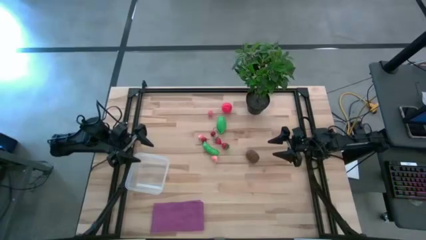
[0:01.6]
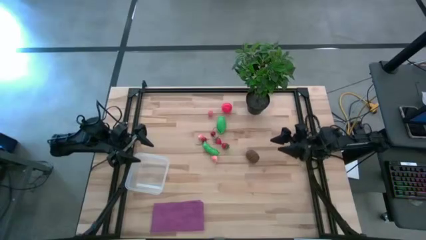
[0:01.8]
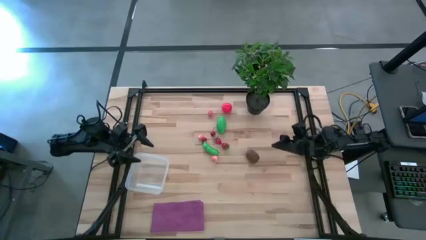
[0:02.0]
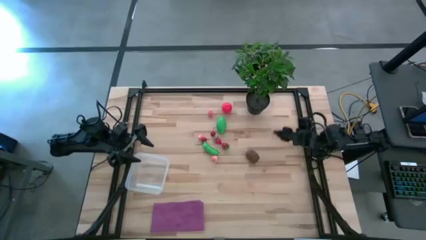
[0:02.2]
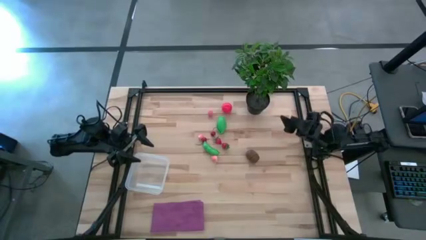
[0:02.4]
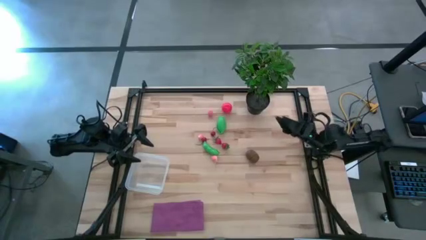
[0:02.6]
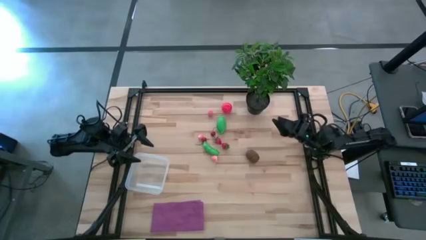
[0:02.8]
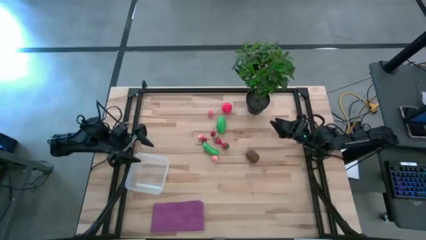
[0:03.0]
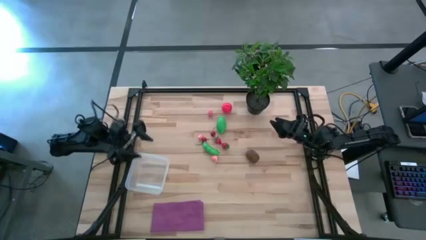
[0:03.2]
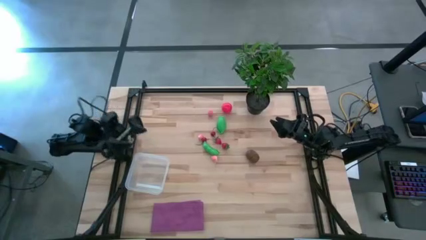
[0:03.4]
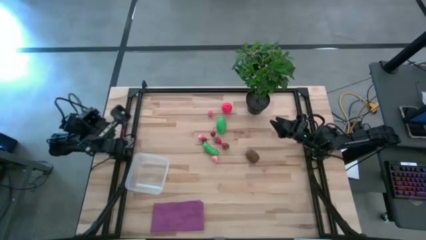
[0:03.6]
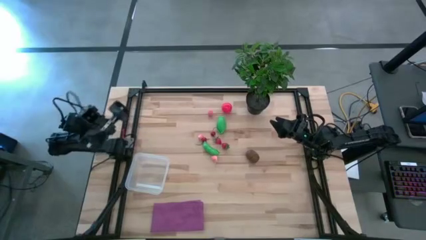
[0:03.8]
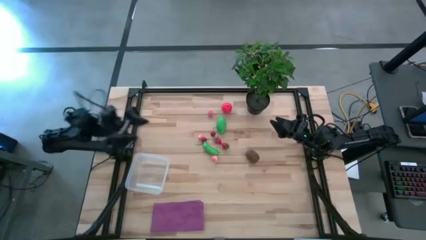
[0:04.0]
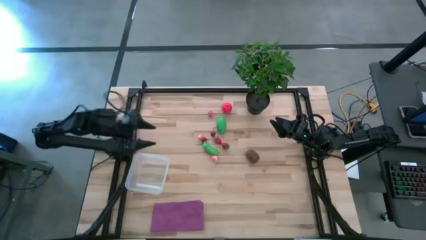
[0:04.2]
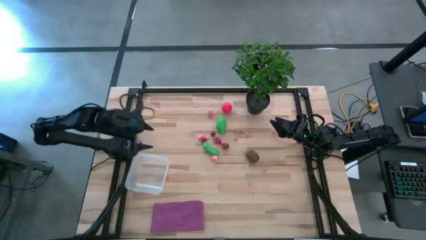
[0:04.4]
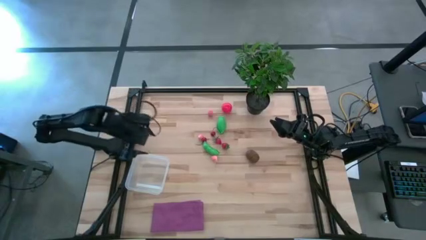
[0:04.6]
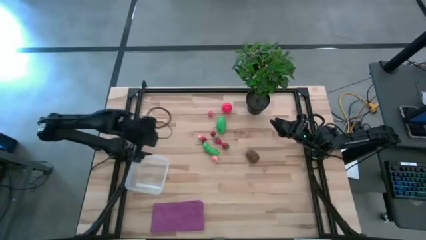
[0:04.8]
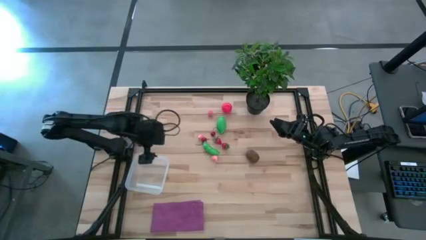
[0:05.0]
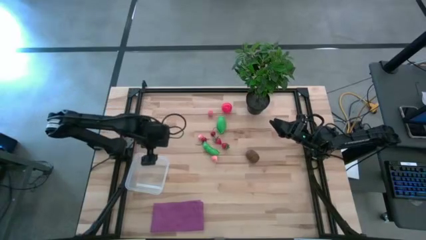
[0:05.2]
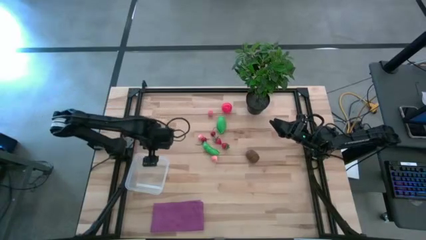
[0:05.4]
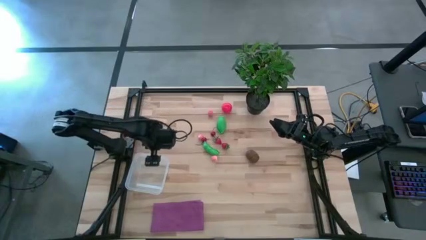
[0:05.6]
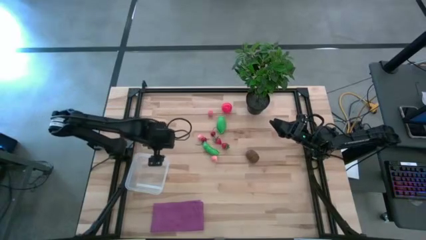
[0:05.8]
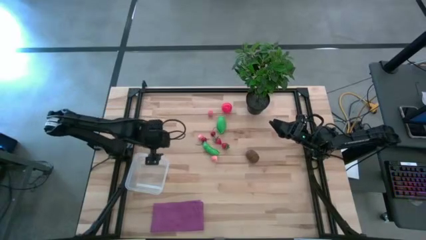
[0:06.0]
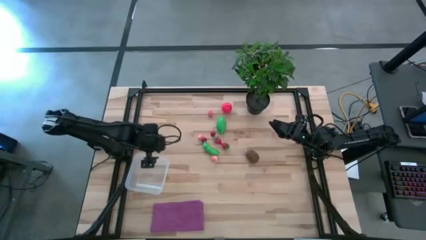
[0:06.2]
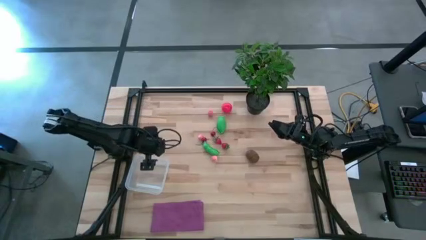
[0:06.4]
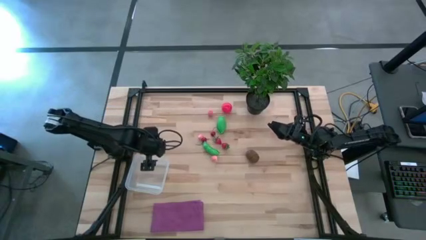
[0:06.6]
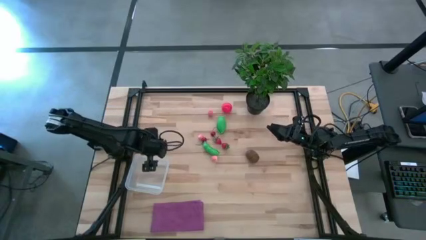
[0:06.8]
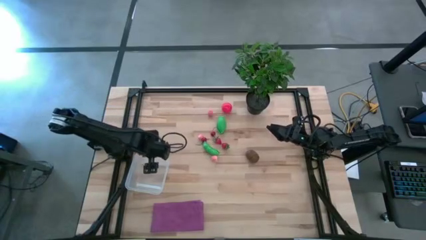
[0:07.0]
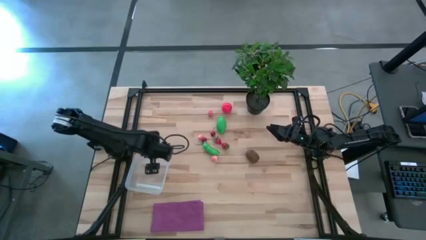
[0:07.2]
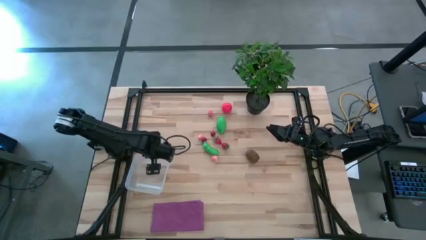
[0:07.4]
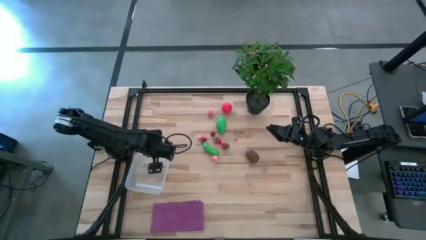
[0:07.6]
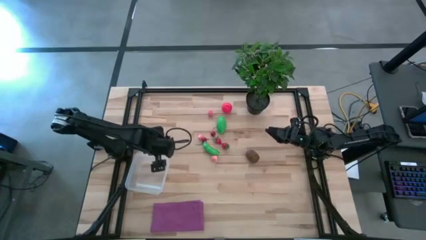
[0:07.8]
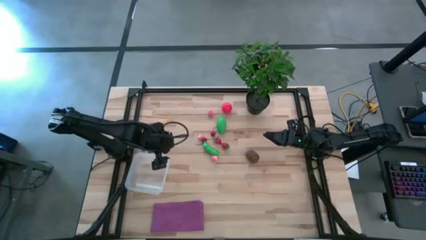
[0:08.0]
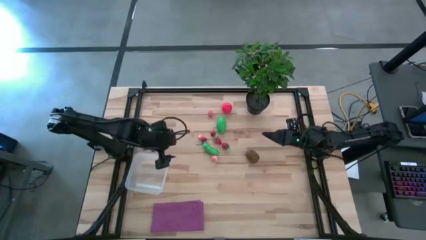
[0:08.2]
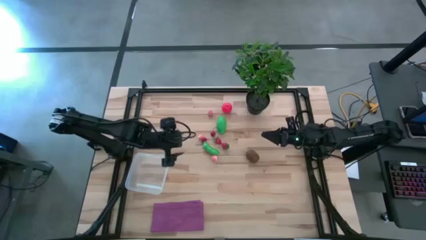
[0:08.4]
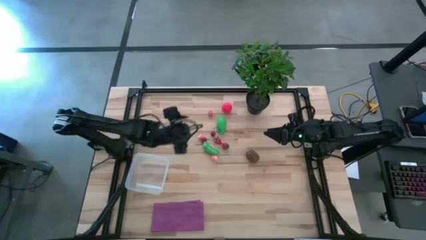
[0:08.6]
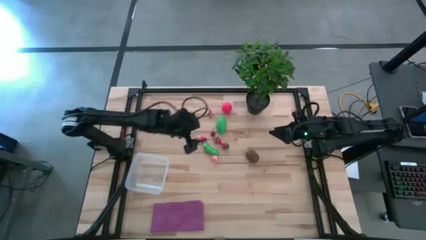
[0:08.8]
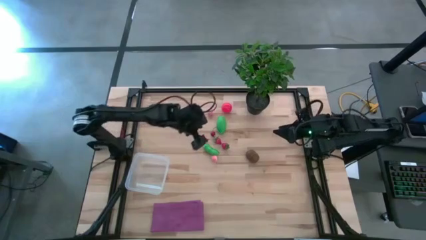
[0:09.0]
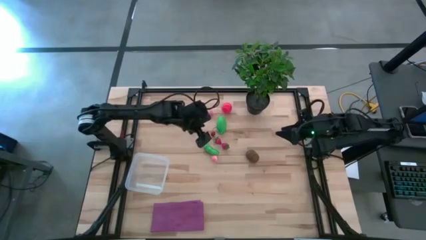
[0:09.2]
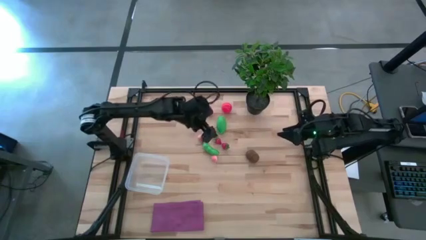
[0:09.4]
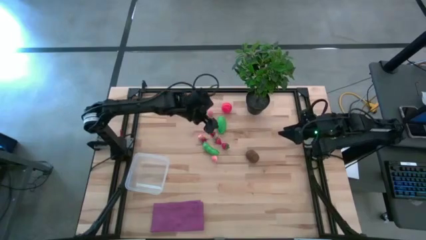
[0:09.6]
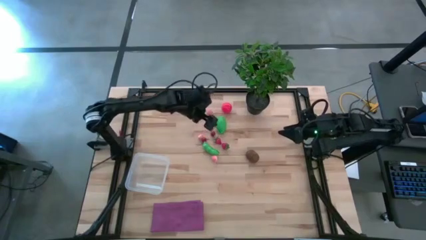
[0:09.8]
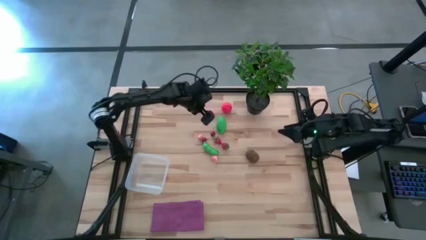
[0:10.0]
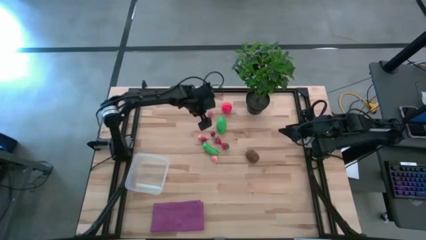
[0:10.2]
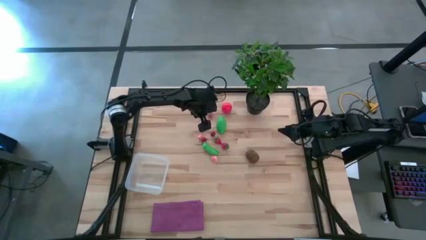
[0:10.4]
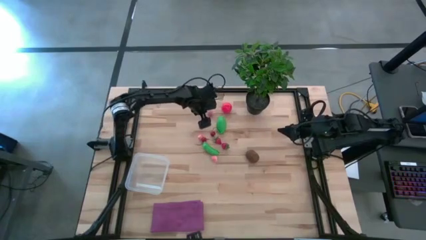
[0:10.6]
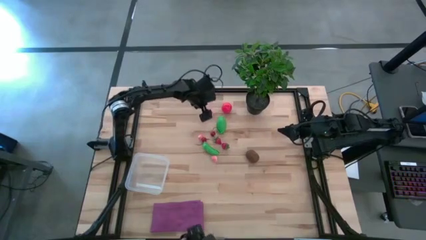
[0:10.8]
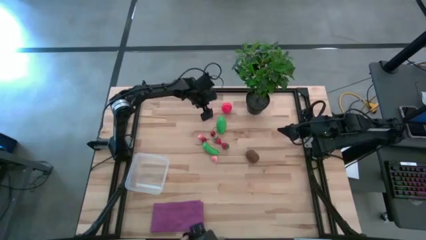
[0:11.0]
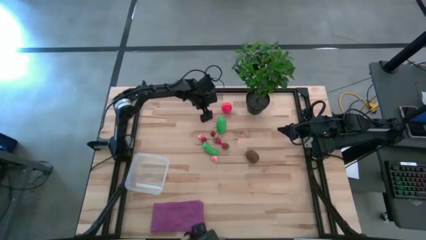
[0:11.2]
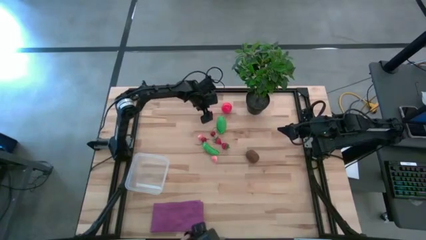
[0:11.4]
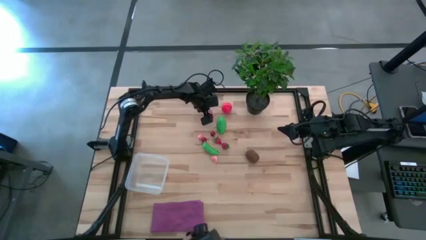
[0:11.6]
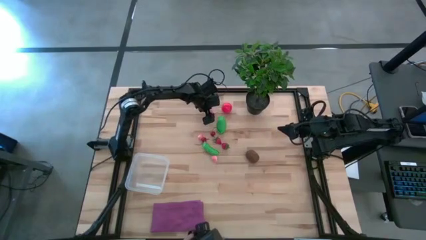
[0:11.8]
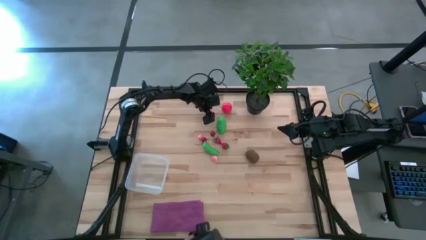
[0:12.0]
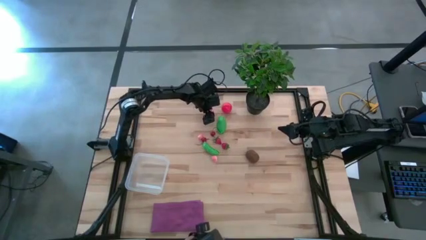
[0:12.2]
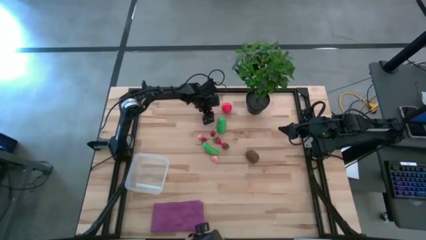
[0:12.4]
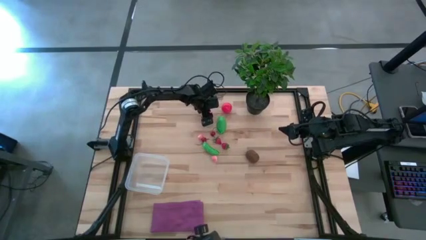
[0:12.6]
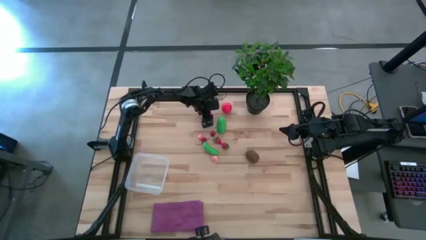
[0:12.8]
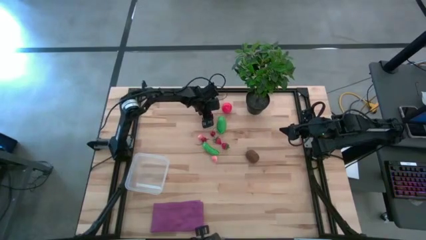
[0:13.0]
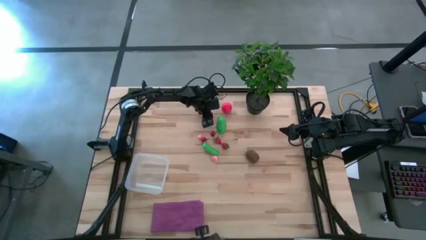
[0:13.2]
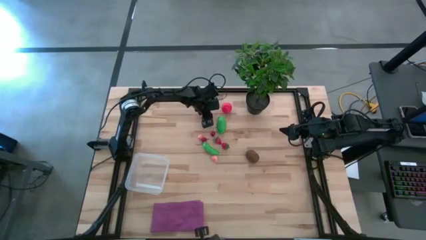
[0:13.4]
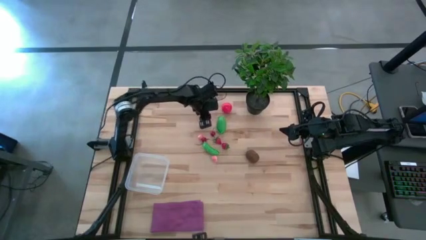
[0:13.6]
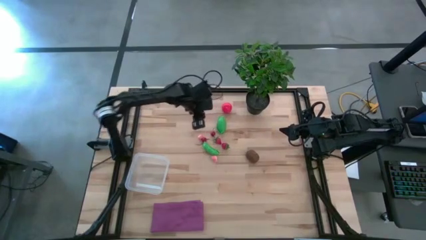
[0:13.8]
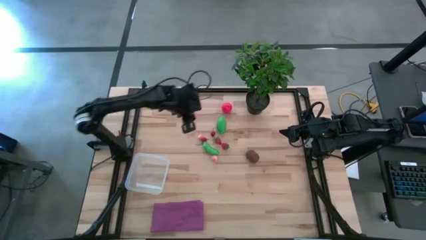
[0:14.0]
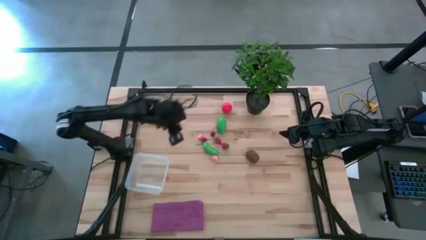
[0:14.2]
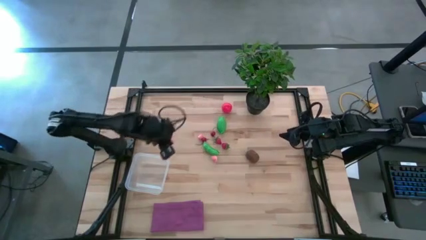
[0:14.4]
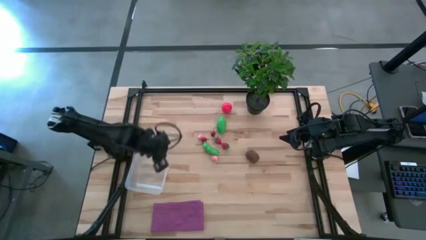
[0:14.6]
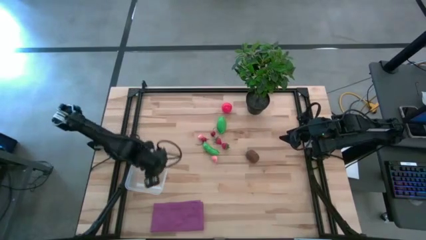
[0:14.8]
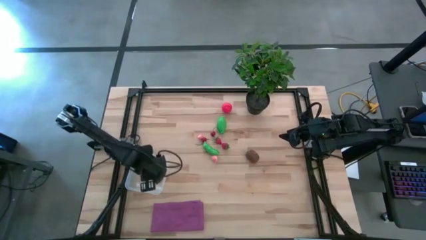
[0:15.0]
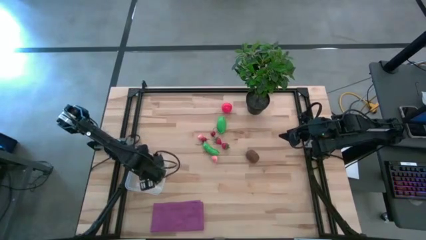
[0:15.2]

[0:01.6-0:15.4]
Task: Pick and placing Produce into tupperware
Put the top pink peach into the transparent container

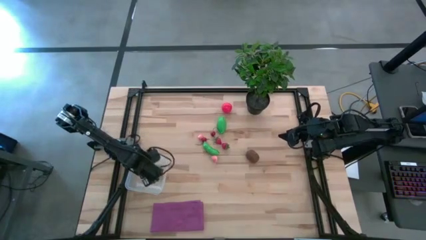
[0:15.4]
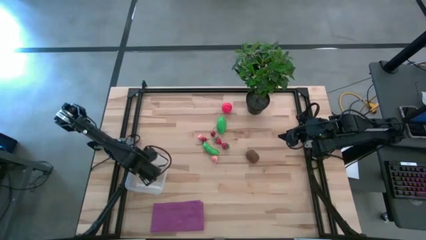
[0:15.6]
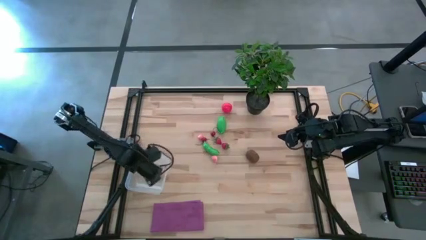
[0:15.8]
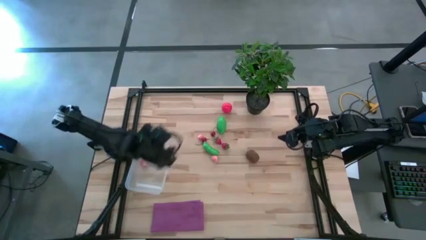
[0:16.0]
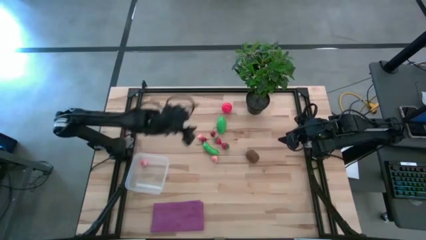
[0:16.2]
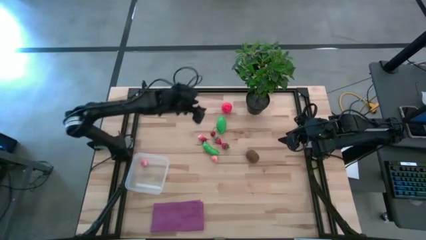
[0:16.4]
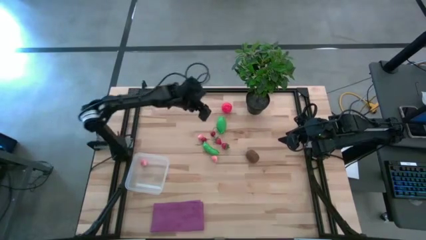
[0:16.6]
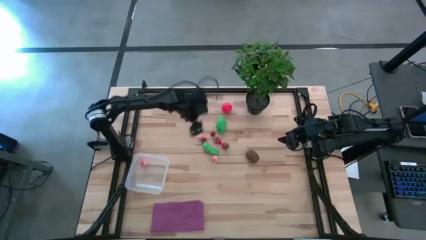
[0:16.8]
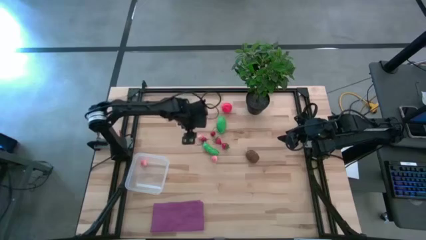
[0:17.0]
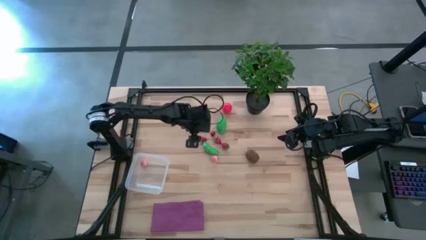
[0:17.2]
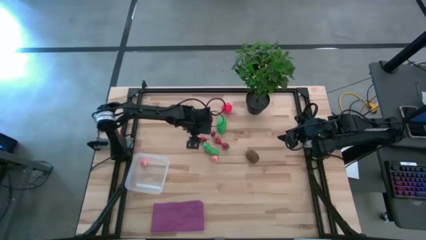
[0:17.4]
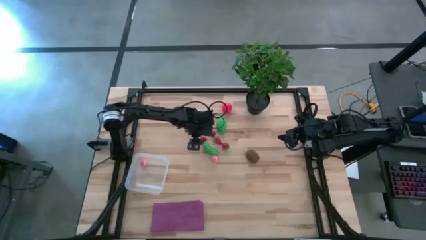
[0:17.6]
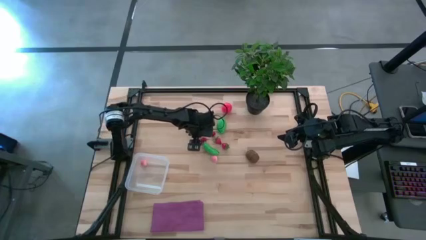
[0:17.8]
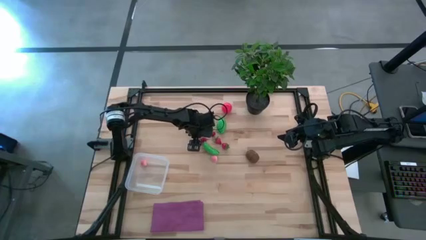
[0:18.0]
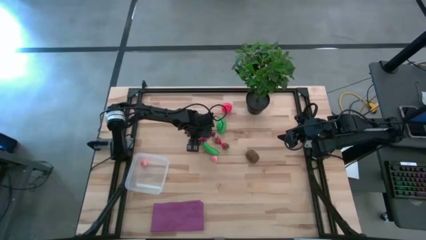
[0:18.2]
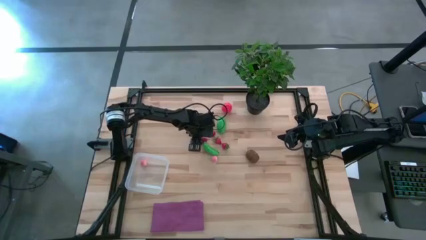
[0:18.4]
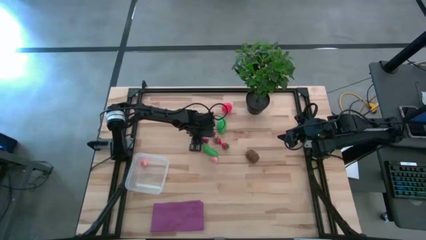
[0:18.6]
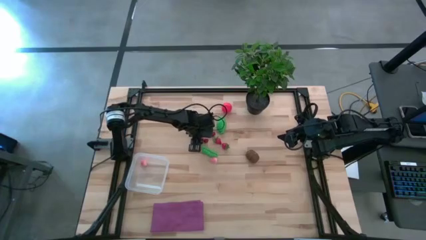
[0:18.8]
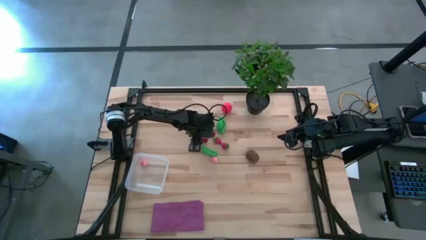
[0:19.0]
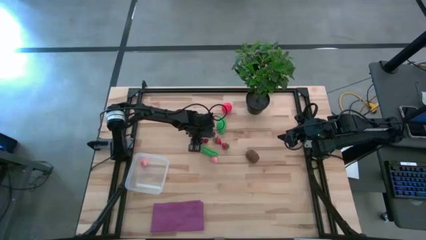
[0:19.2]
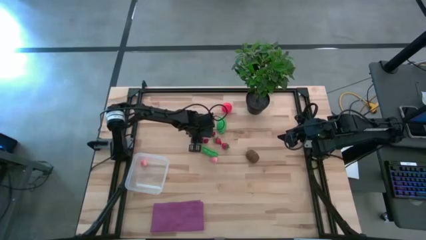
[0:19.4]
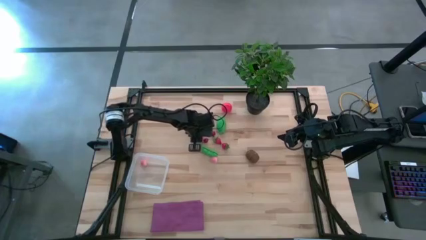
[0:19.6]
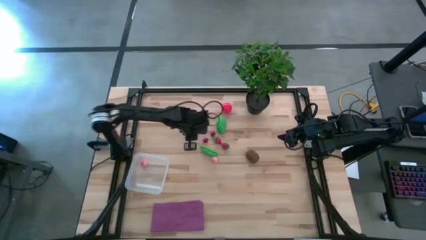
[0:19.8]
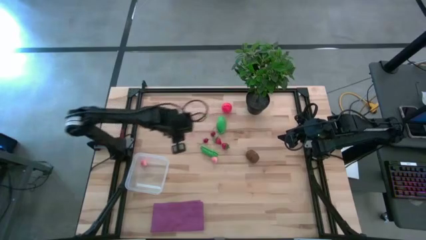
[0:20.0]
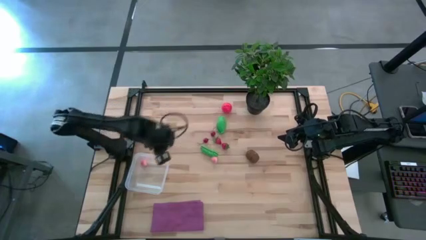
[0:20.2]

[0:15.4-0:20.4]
Put the top pink peach into the transparent container
